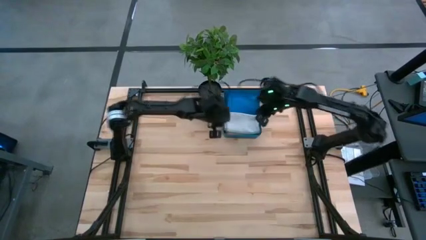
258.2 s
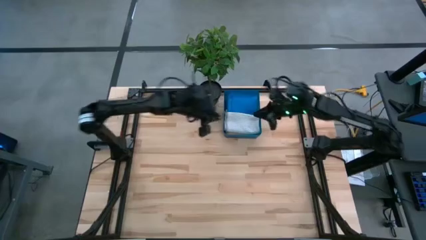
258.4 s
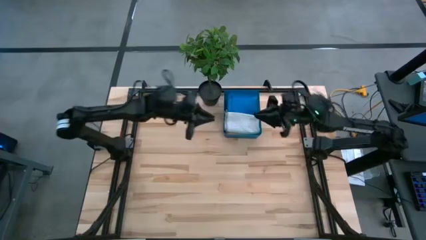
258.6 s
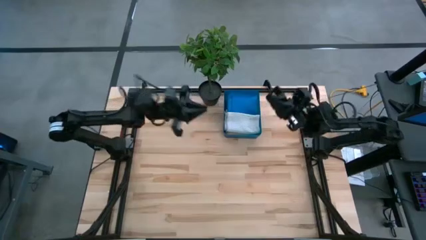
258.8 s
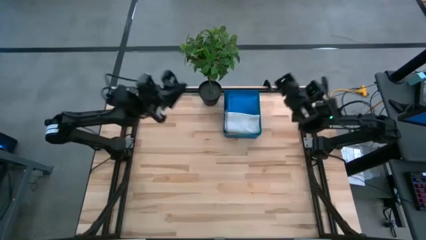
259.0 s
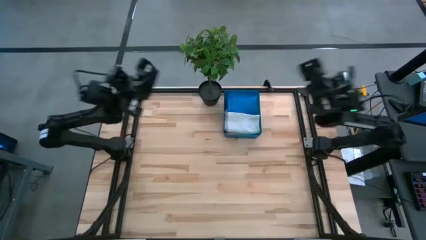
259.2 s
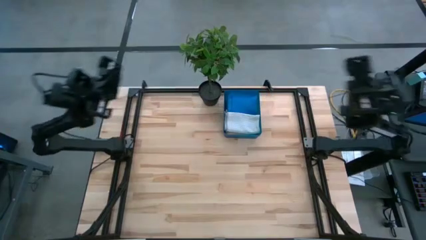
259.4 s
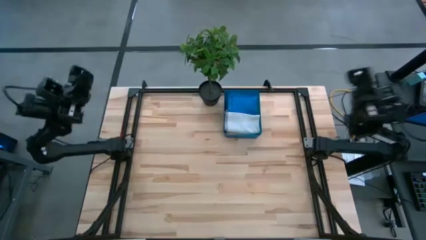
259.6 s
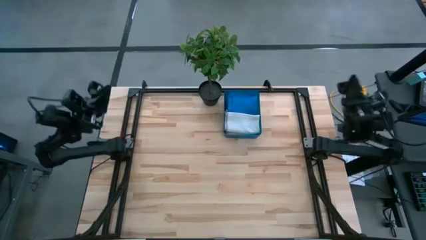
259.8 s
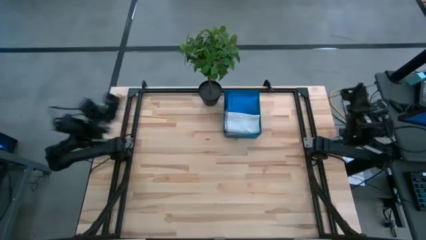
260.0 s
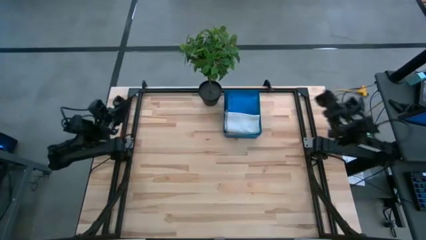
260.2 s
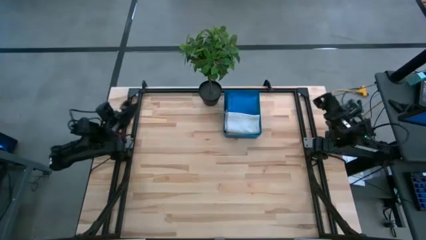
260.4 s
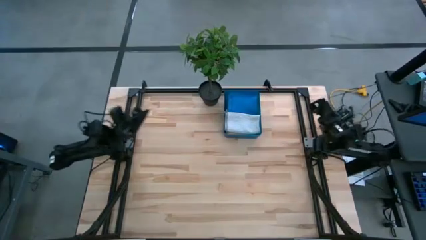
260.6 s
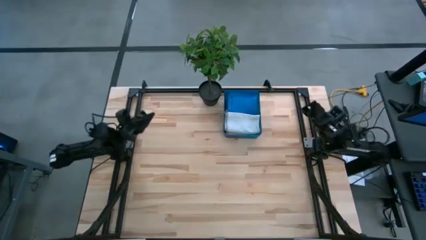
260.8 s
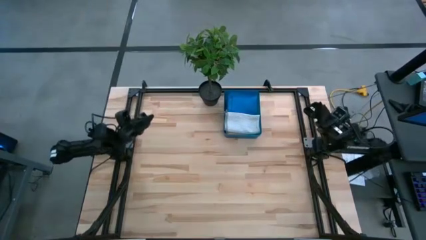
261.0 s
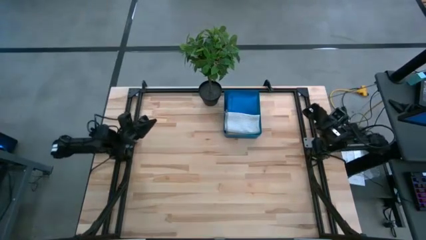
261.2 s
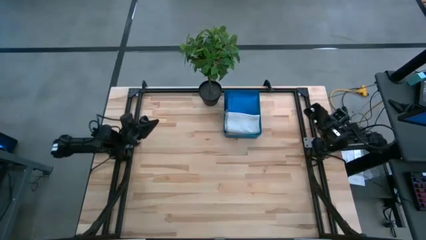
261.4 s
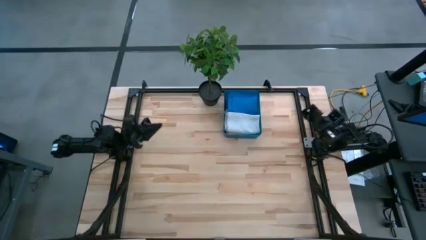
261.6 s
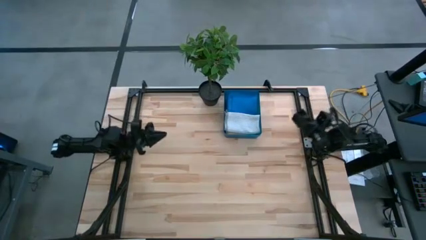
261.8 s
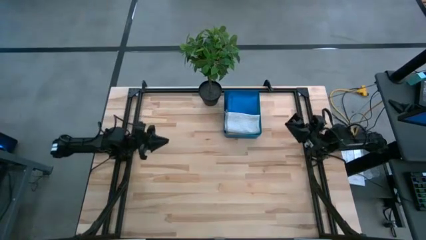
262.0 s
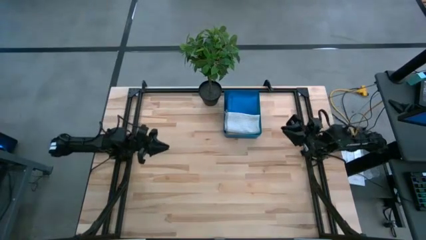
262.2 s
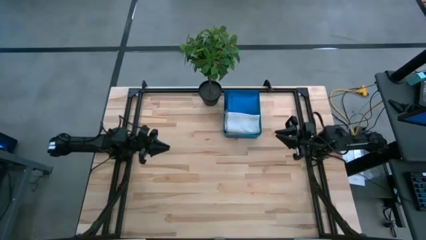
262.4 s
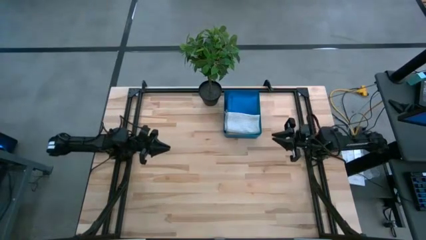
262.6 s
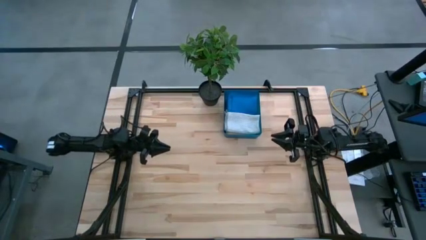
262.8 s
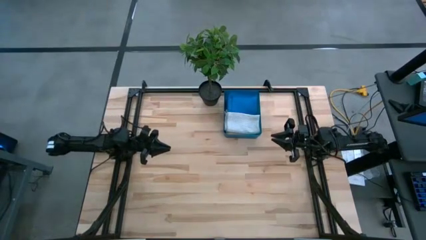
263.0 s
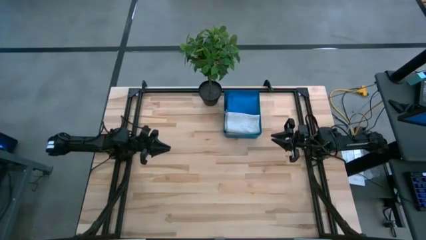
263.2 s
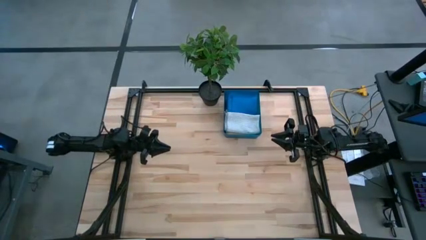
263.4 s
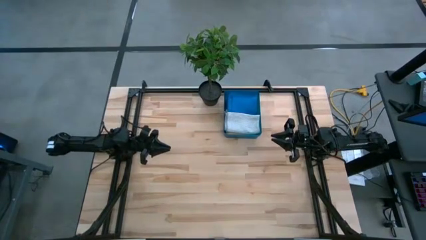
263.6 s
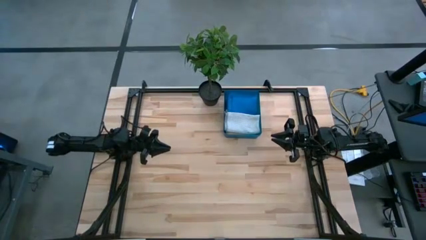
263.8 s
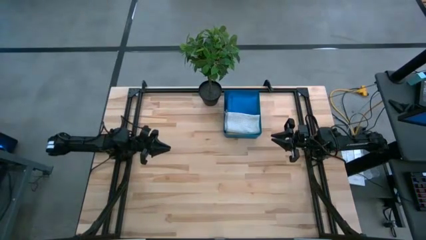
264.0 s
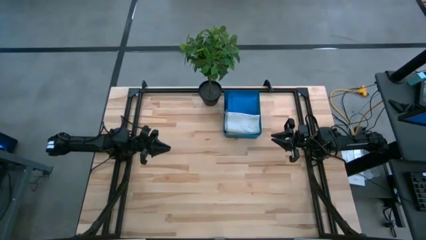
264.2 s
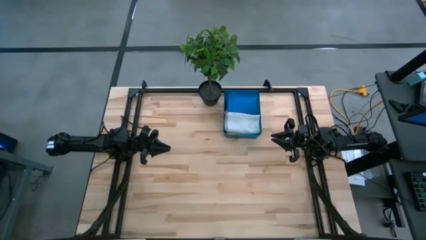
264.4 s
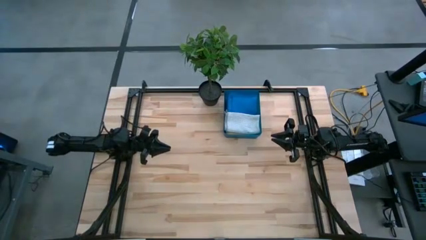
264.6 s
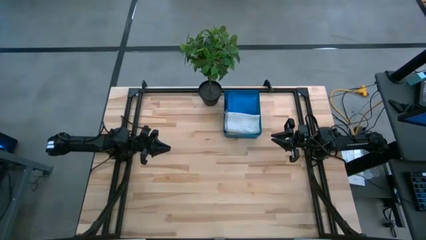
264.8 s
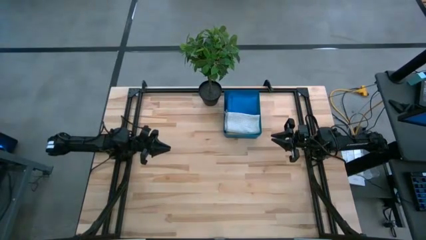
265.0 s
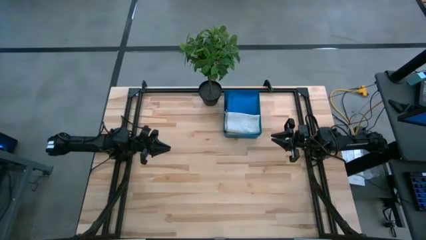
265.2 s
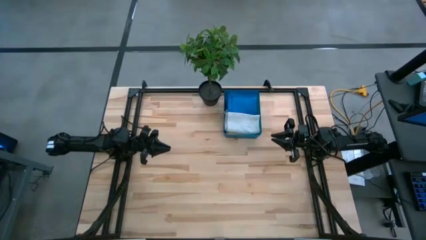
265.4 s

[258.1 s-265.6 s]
Task: Fold microfiber towels
Return to Home Position

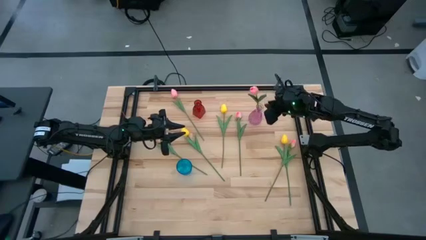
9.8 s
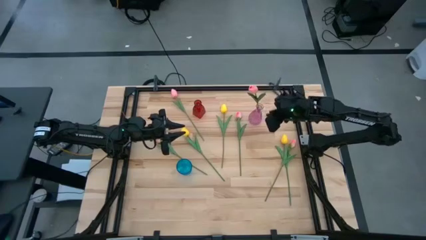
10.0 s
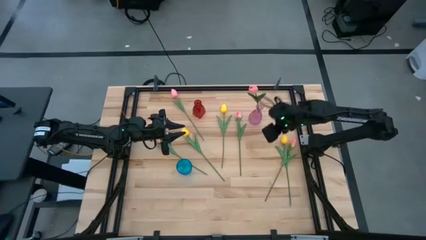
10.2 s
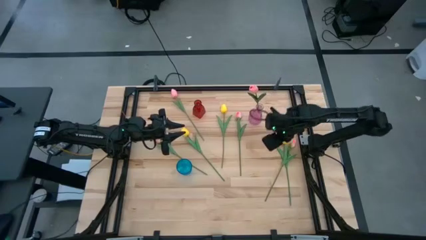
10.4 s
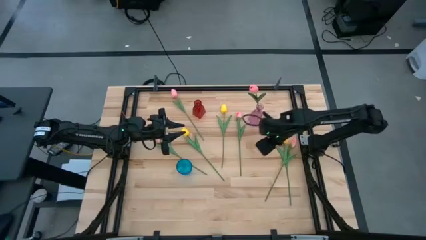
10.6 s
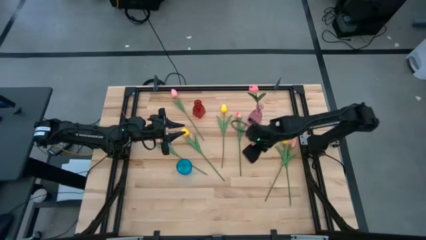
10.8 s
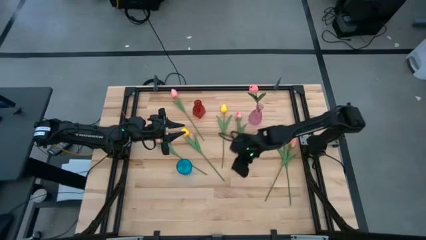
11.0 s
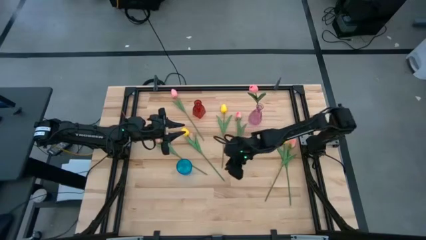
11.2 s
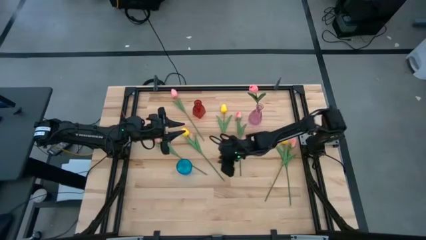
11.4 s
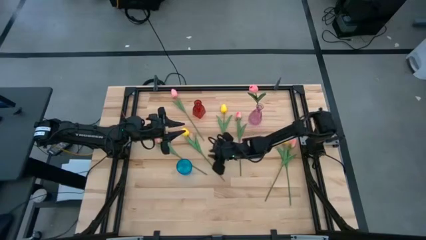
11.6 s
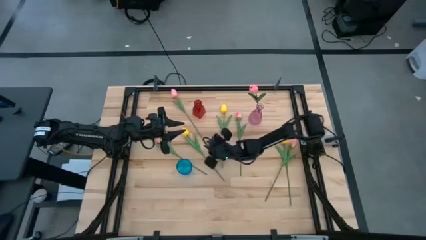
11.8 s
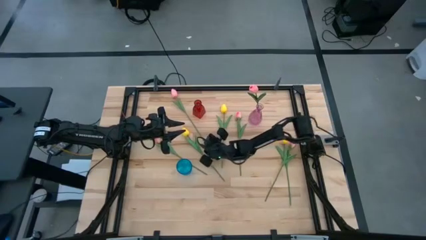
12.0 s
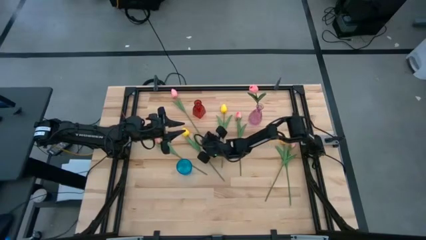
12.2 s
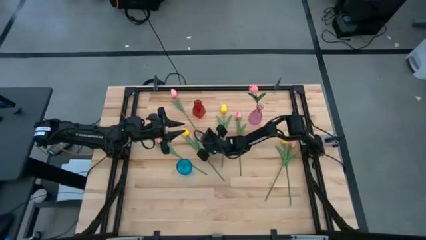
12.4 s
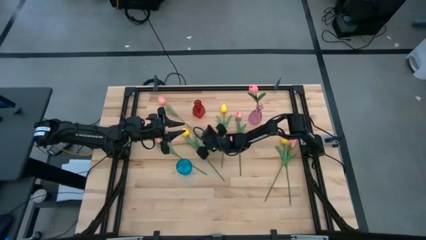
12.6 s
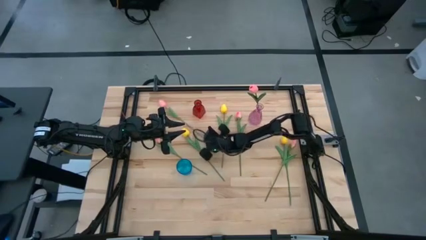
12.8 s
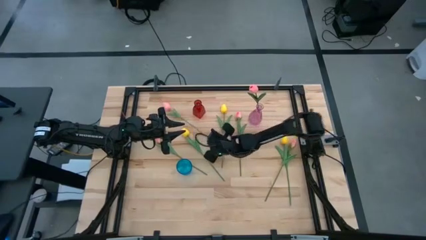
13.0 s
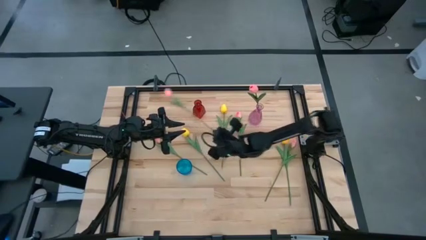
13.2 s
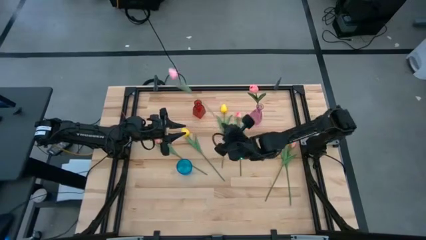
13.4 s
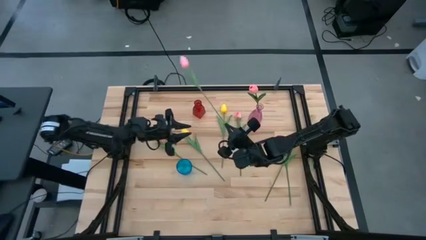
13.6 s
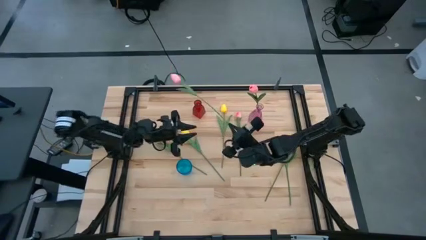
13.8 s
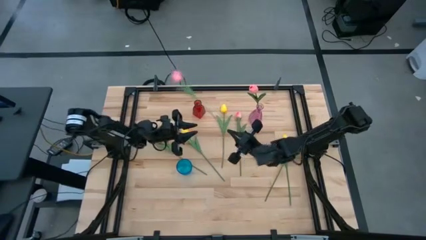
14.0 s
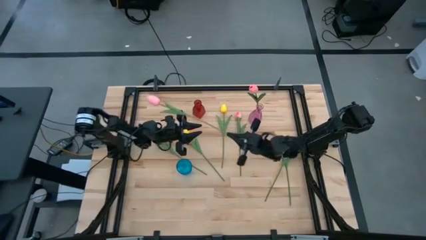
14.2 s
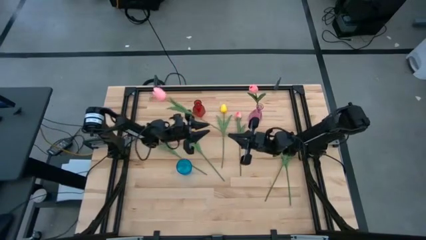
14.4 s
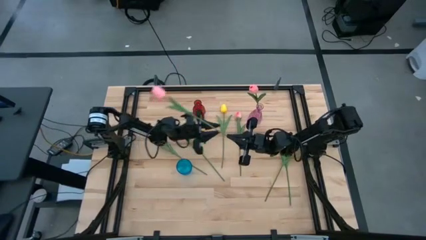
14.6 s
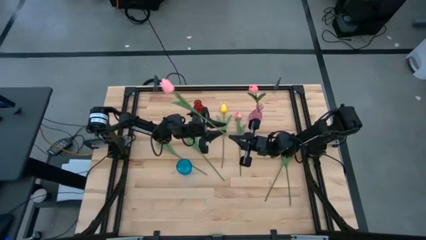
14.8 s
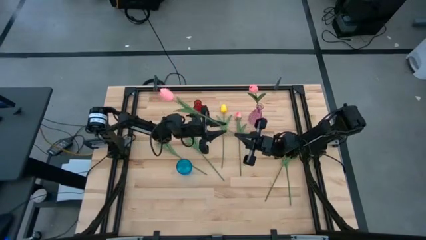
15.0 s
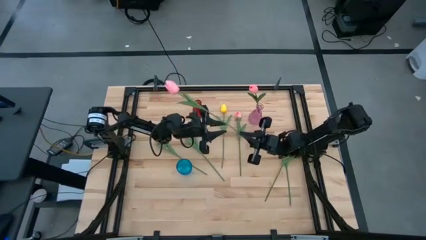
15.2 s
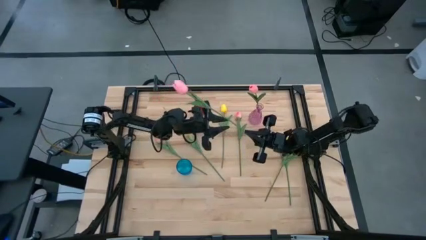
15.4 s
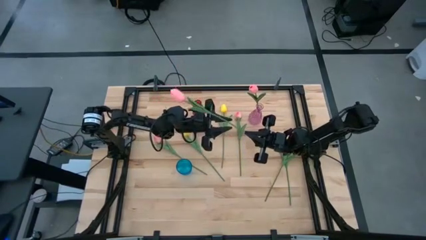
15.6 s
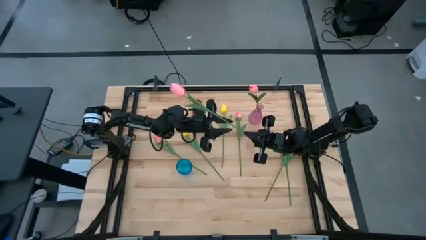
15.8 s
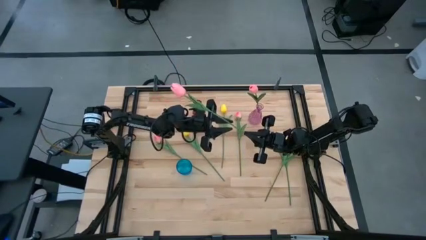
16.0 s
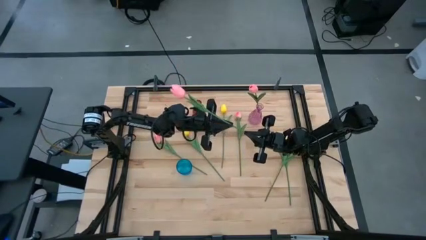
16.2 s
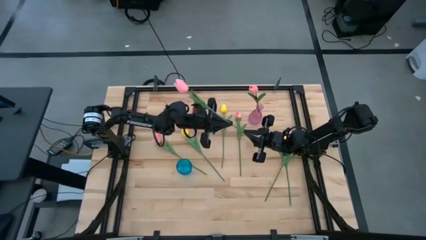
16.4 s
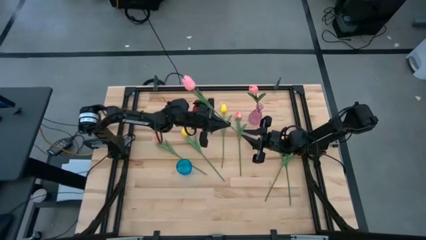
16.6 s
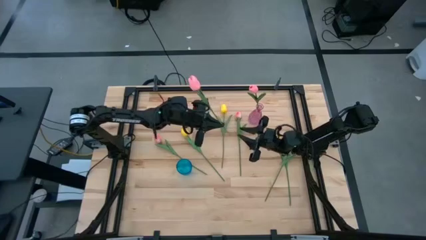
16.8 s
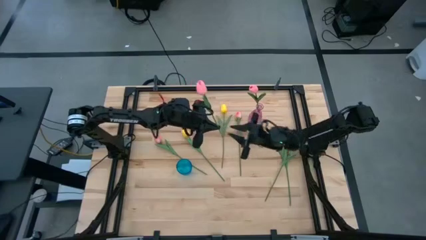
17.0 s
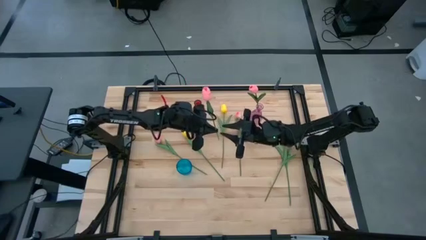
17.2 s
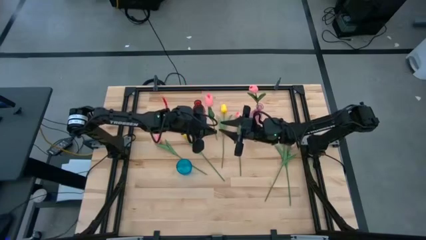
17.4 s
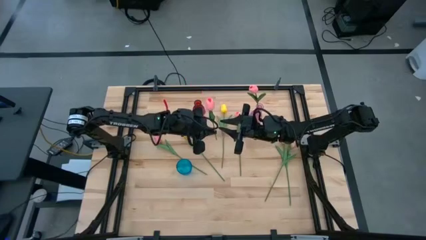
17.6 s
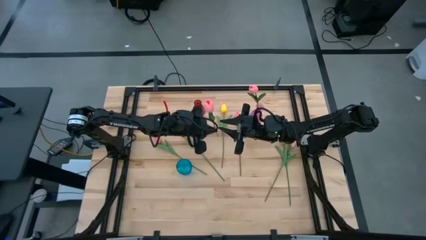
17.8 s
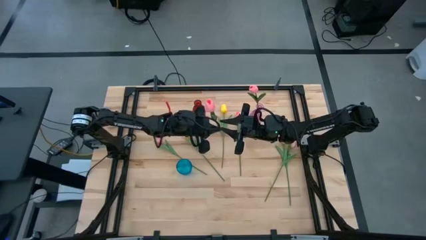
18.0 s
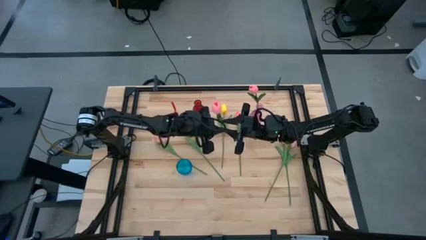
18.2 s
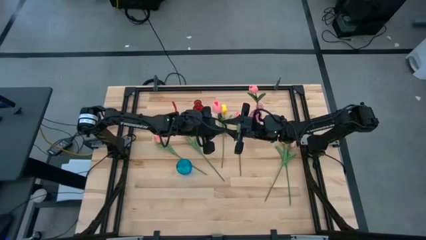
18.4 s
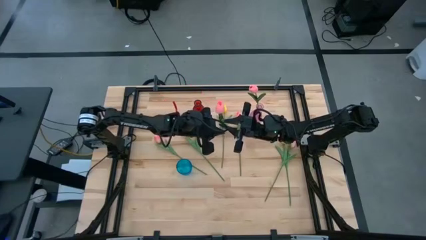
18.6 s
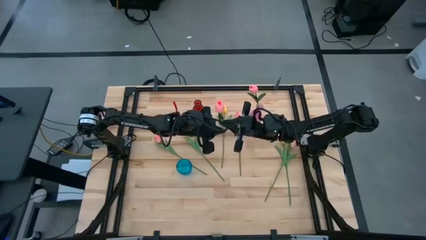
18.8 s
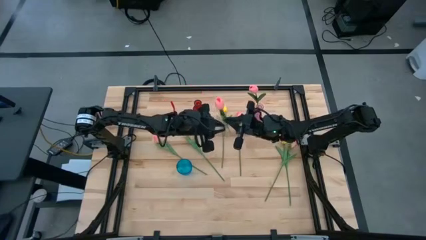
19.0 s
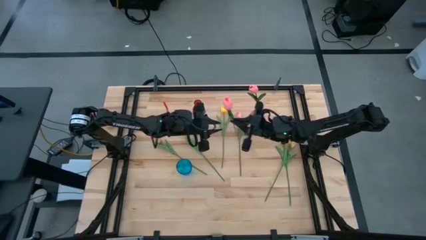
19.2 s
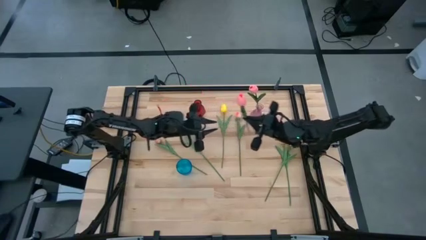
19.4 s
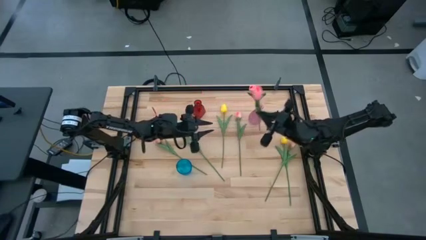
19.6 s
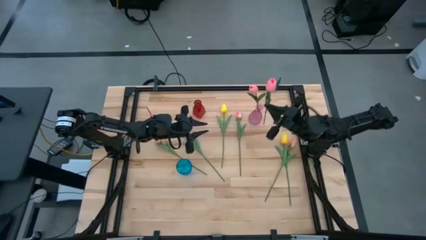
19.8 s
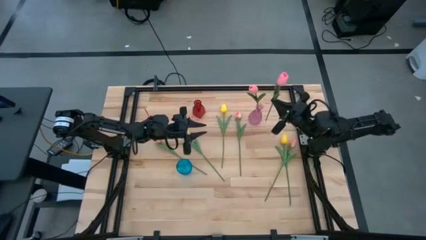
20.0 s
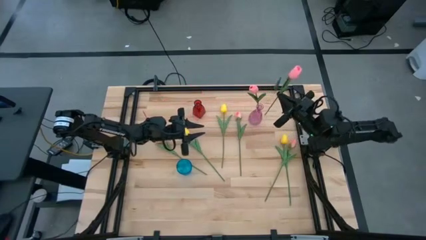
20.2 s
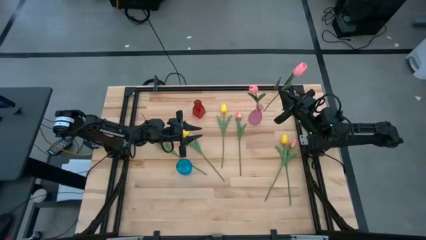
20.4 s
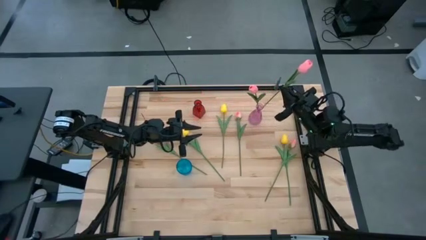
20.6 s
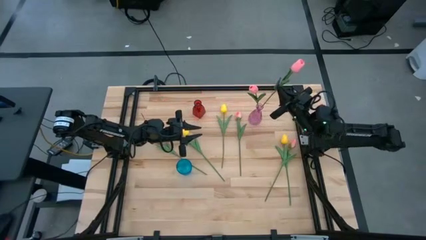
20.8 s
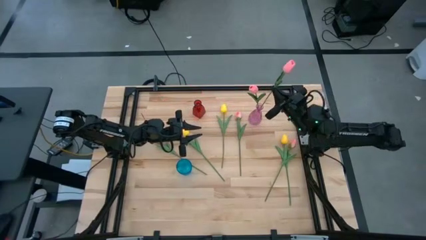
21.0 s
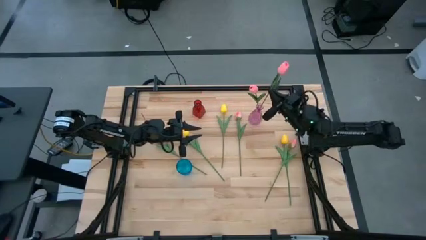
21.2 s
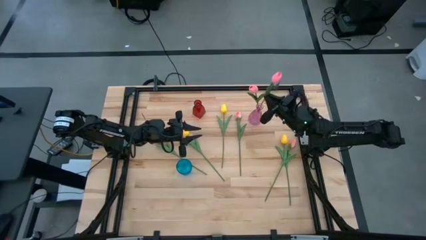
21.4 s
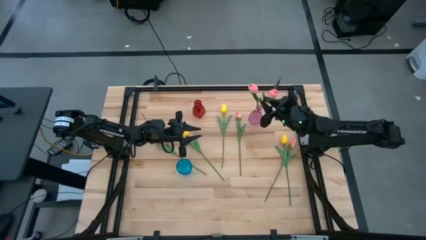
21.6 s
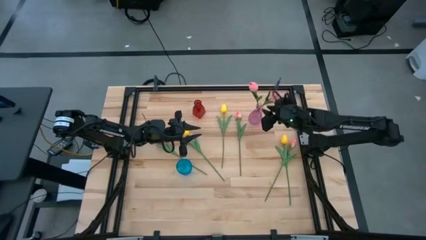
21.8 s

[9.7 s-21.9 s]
Task: Sort flowers into vase by color
Put the pink tulip into the violet flower vase
